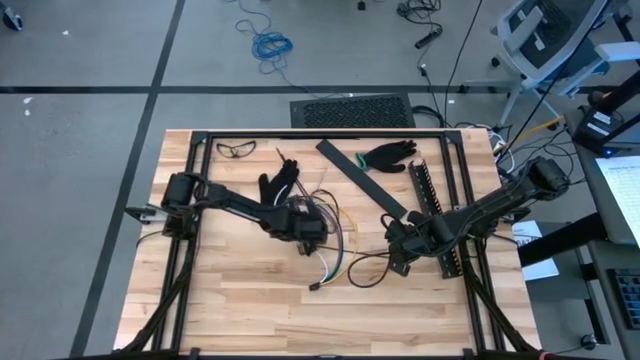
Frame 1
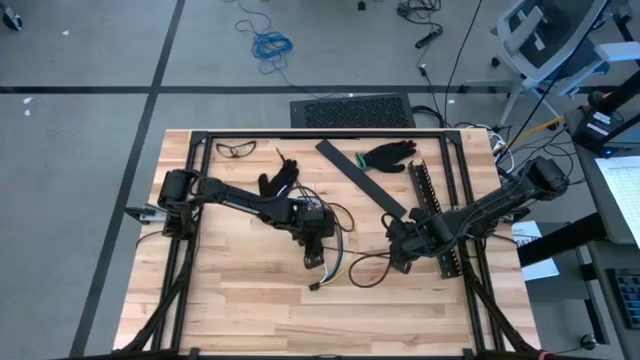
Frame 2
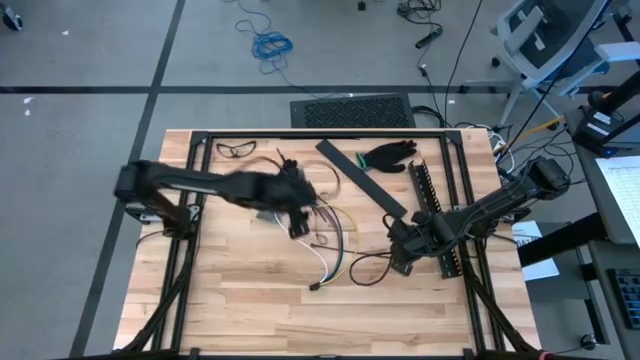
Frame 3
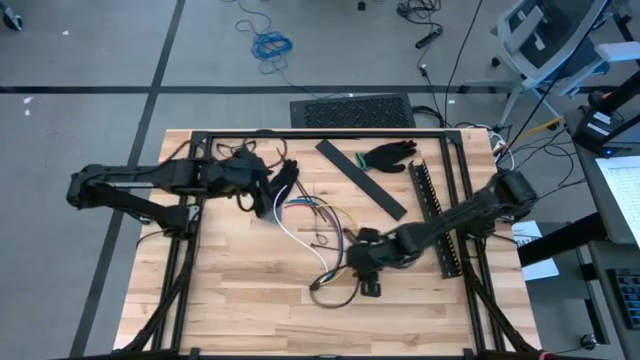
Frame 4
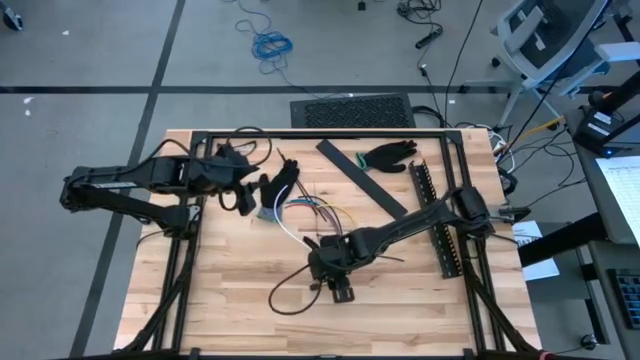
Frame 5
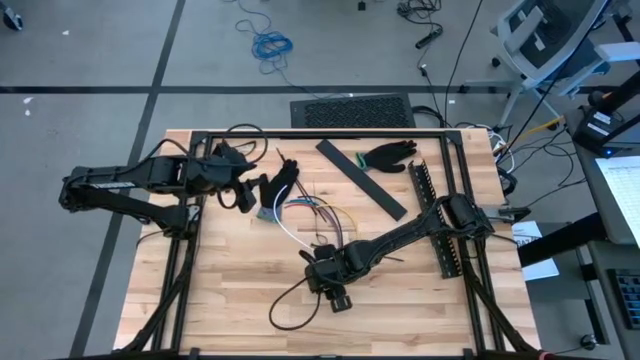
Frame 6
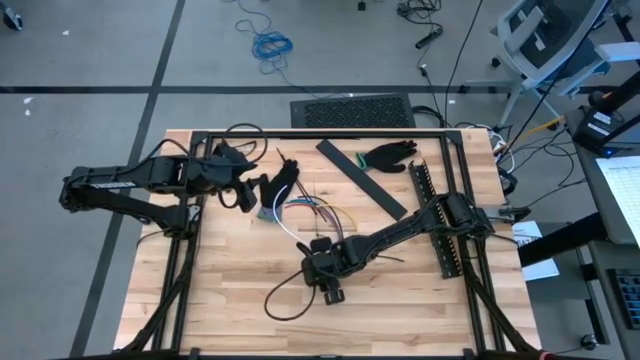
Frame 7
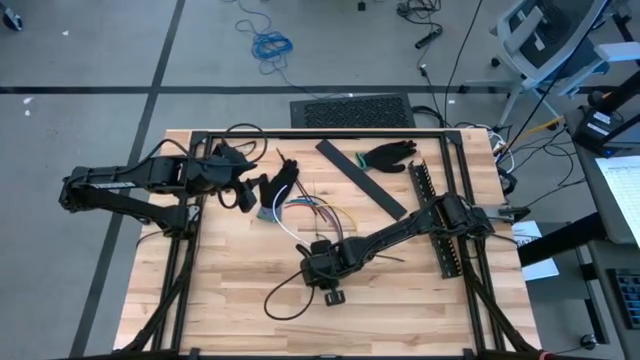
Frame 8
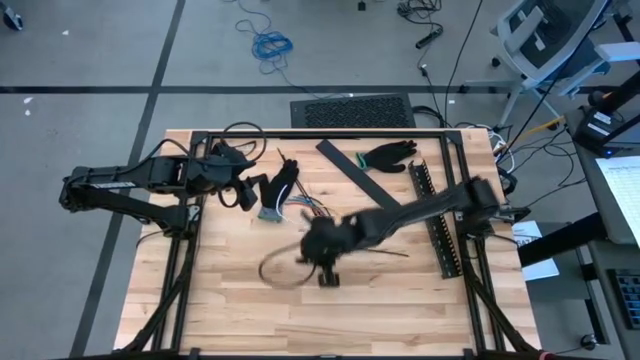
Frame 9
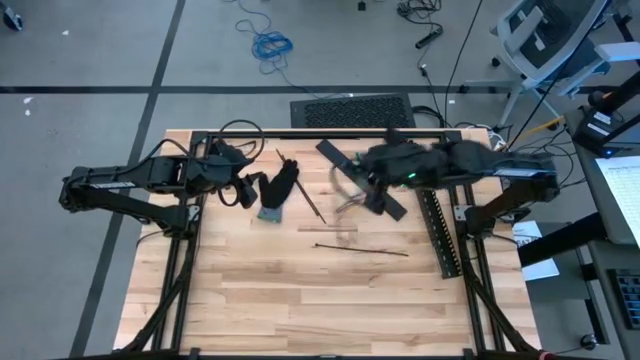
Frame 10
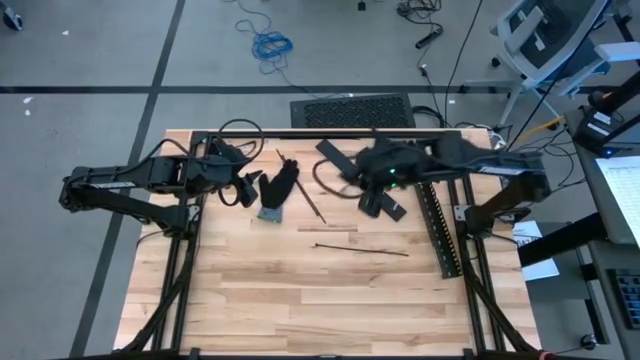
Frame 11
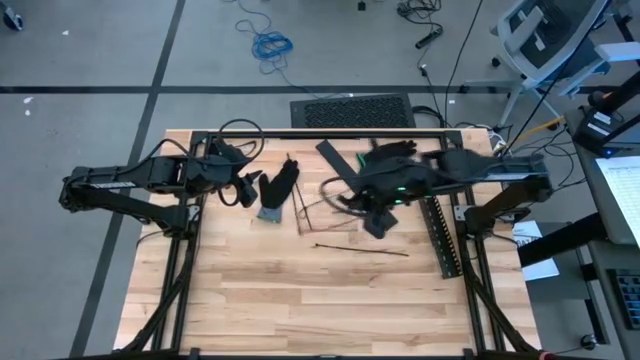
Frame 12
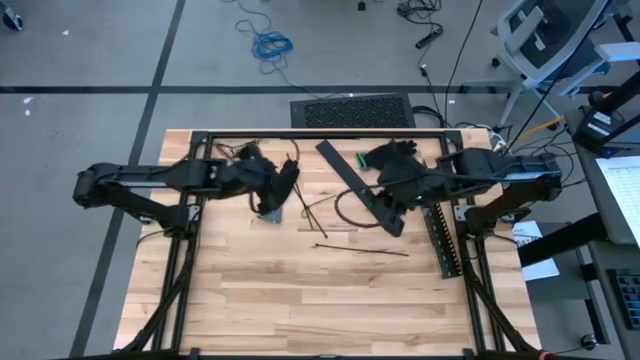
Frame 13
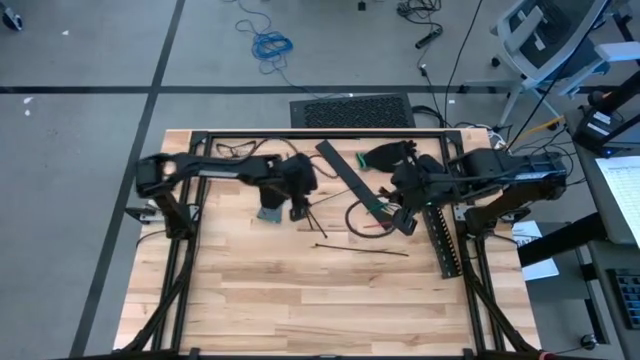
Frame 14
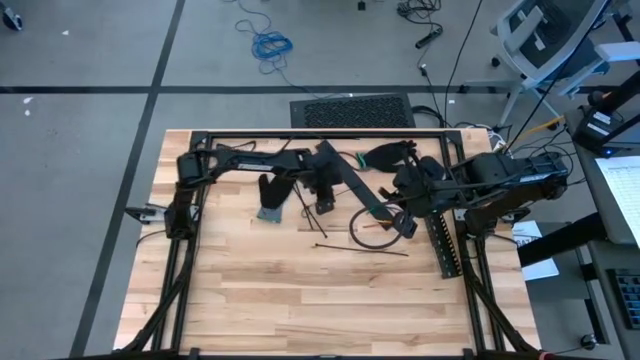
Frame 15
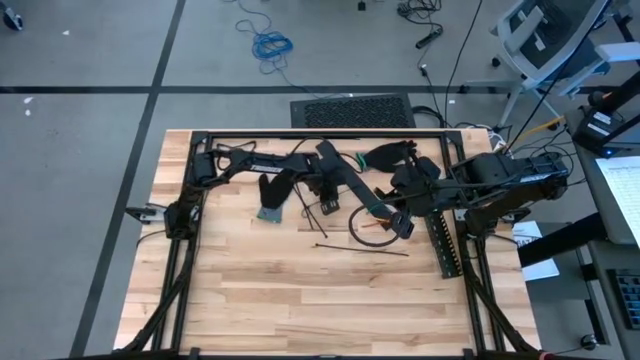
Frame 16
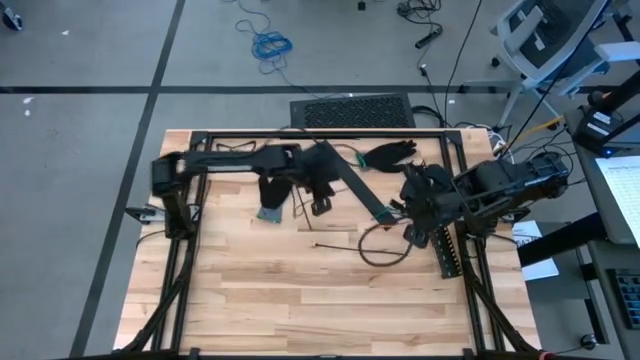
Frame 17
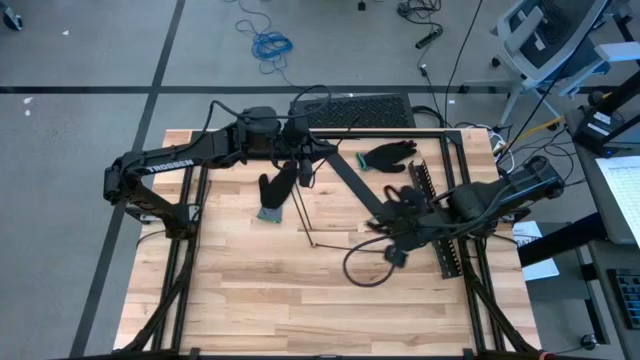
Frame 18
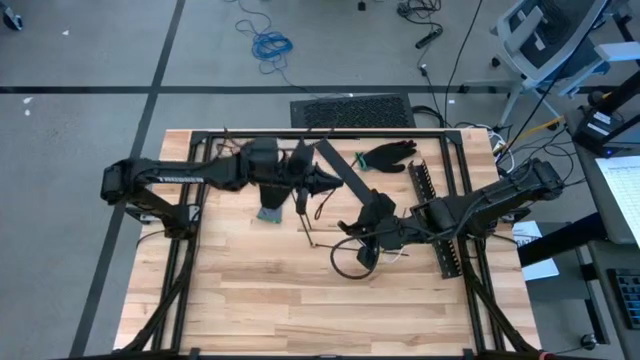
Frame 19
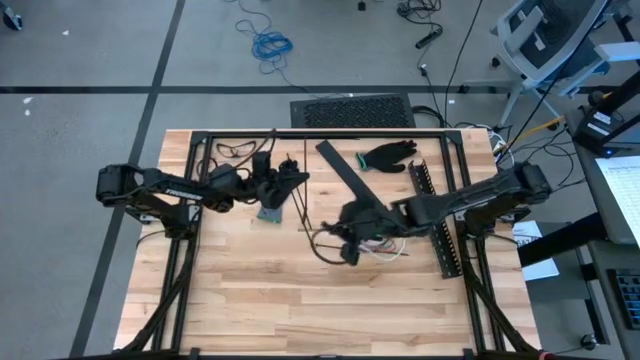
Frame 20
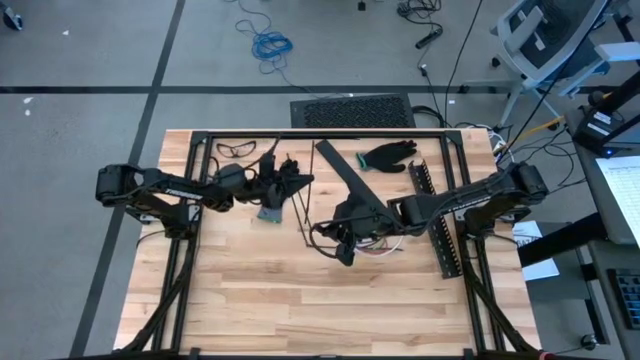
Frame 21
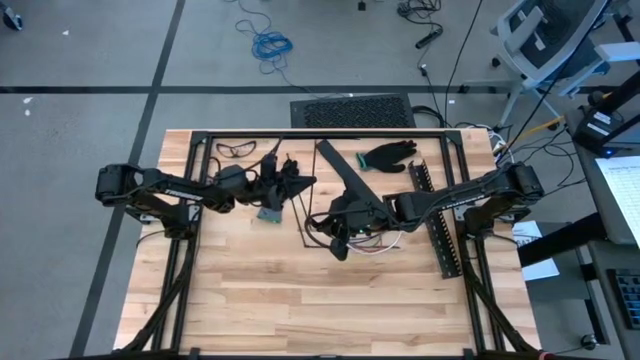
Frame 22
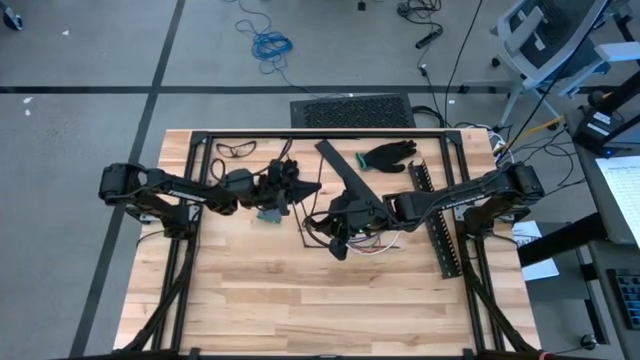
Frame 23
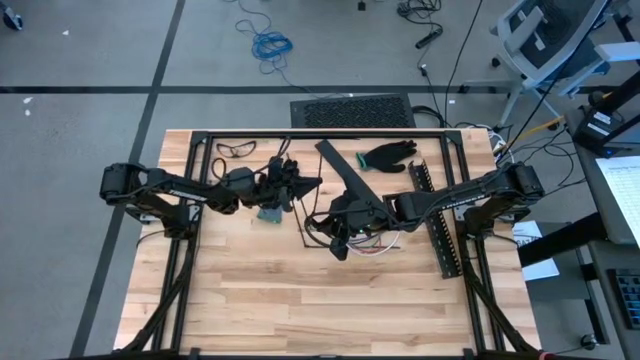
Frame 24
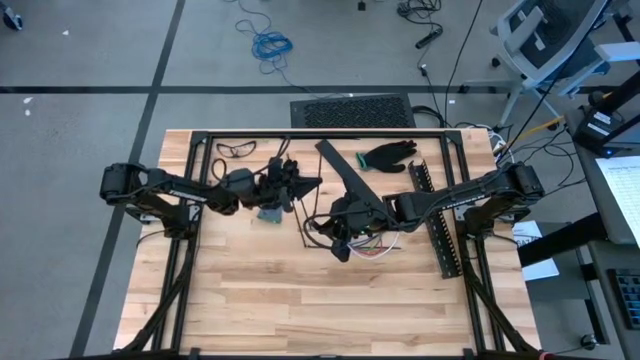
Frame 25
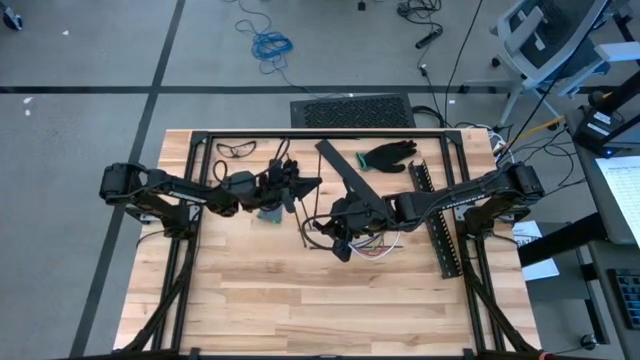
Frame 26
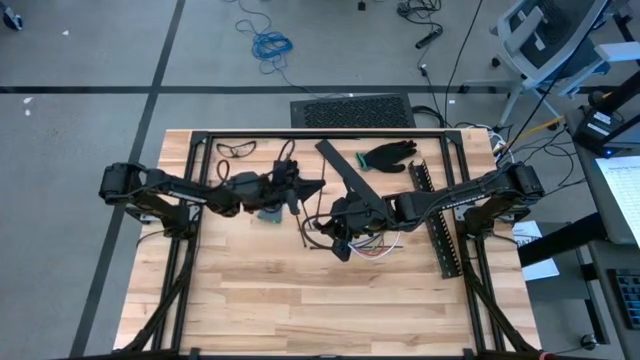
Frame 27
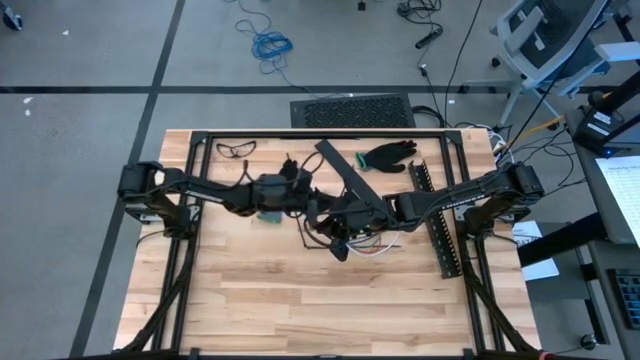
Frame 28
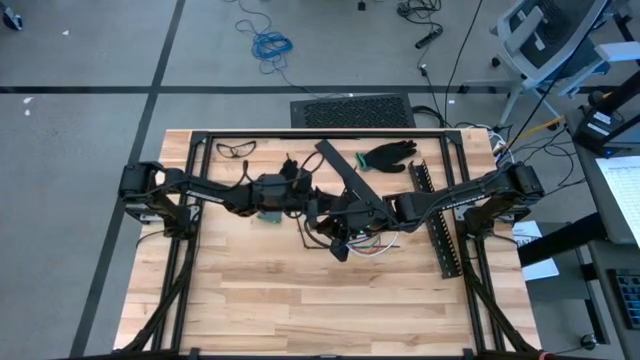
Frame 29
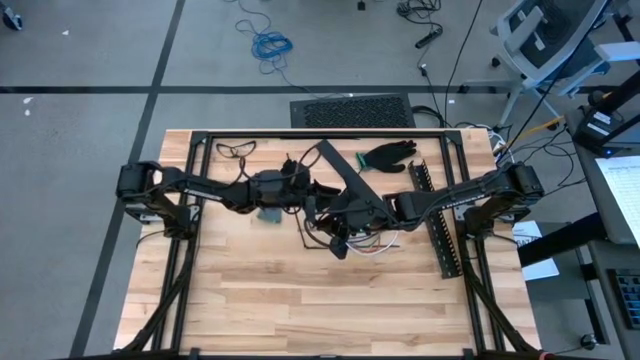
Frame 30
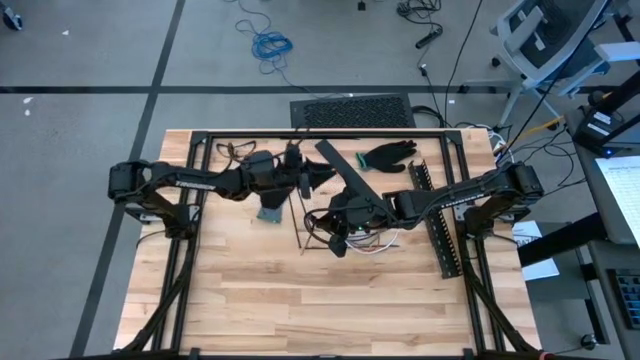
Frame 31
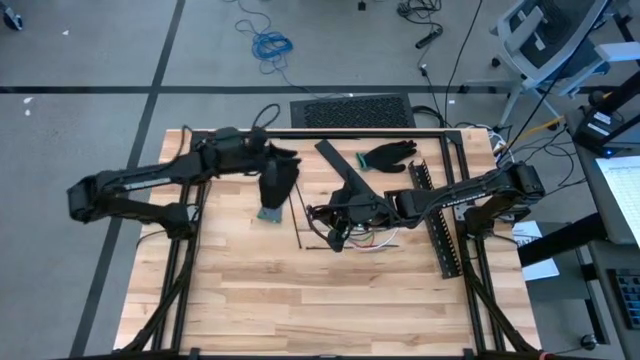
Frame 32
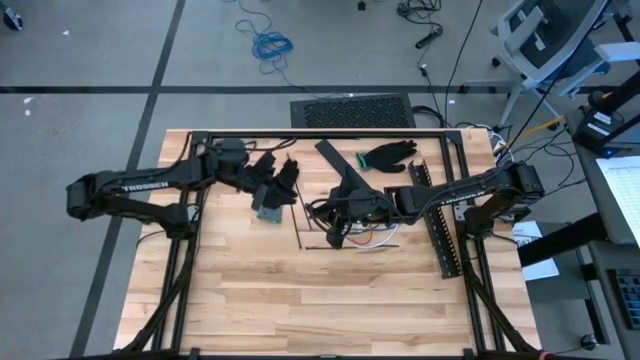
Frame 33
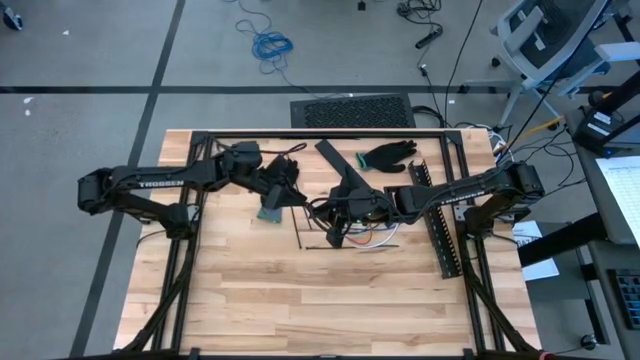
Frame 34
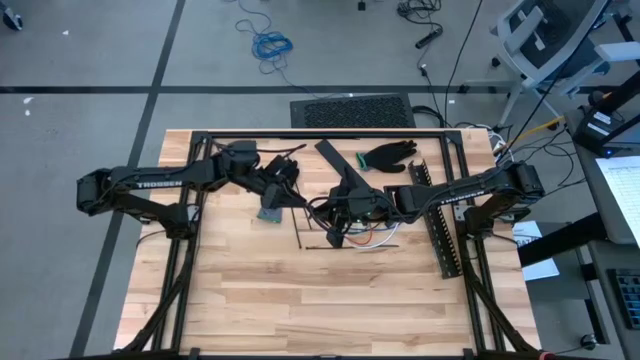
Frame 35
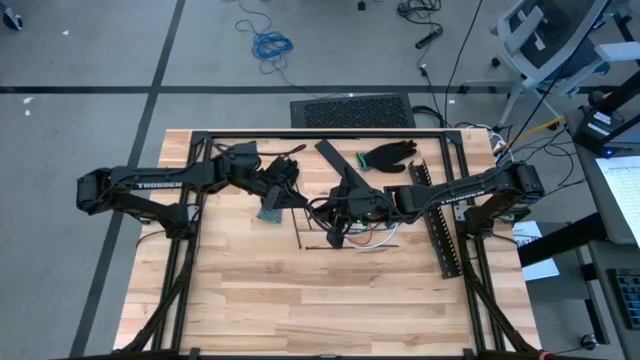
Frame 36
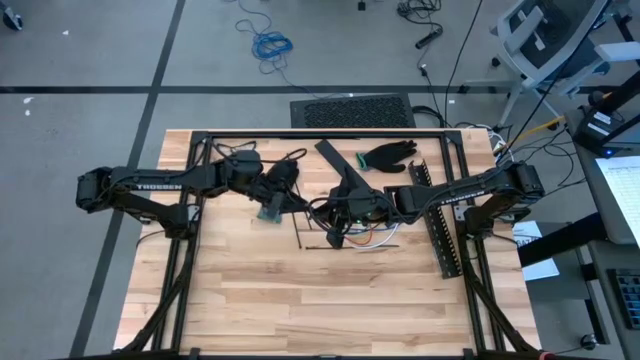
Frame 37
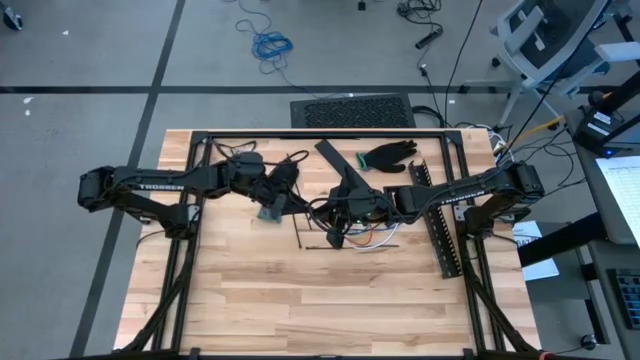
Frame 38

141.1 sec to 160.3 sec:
Task: Ziptie cables
Wrap the black zip tie on the cable

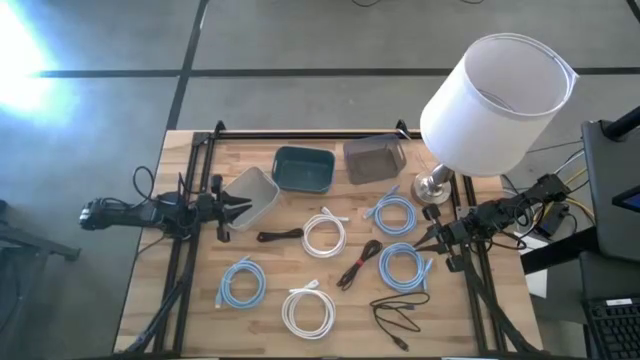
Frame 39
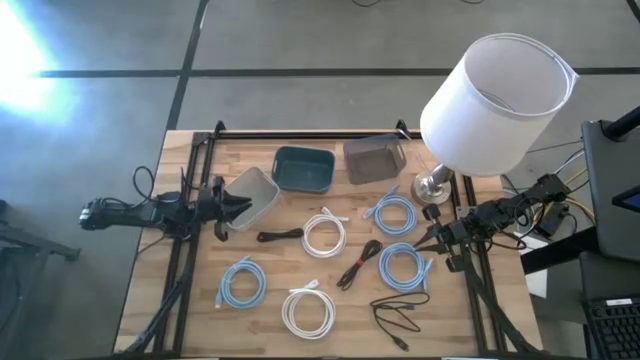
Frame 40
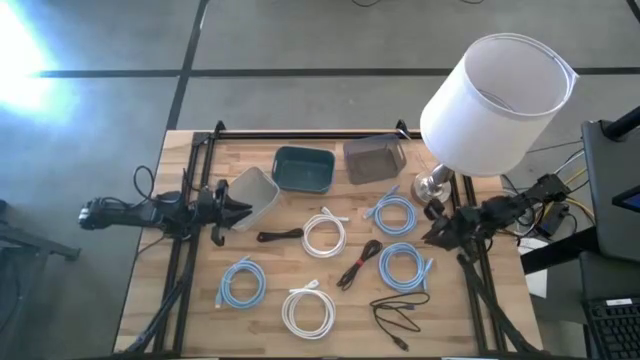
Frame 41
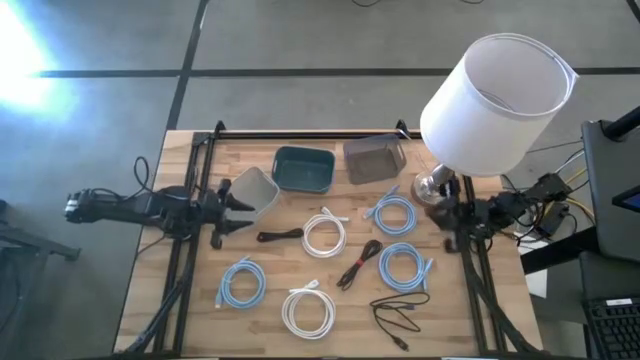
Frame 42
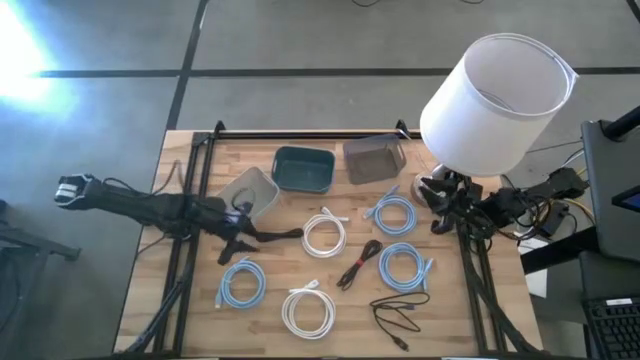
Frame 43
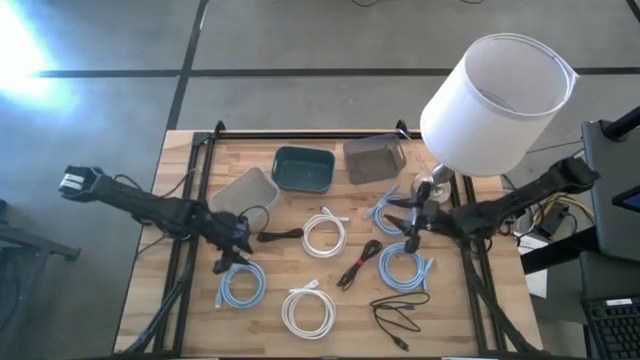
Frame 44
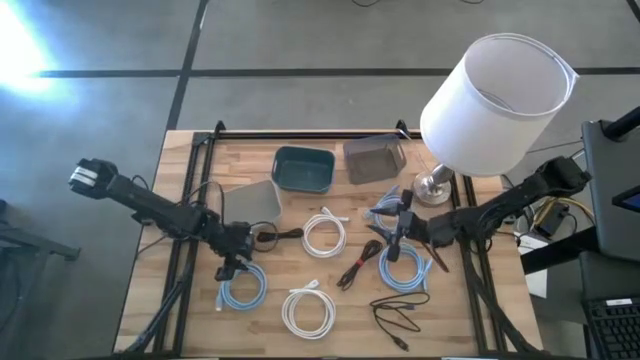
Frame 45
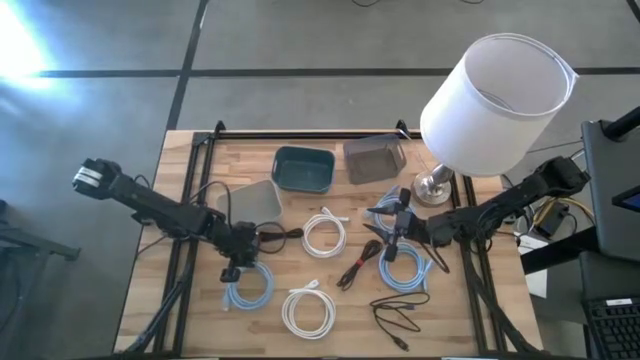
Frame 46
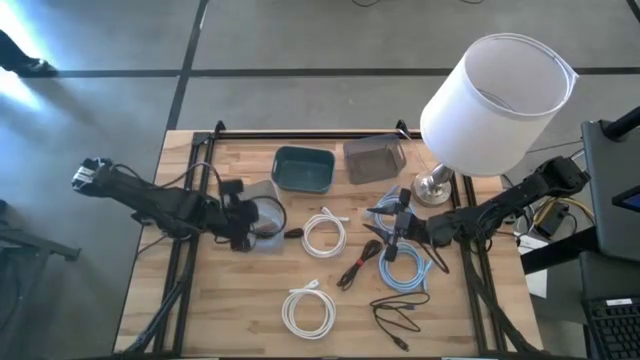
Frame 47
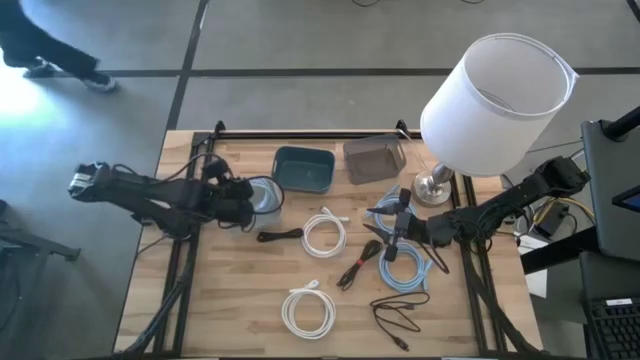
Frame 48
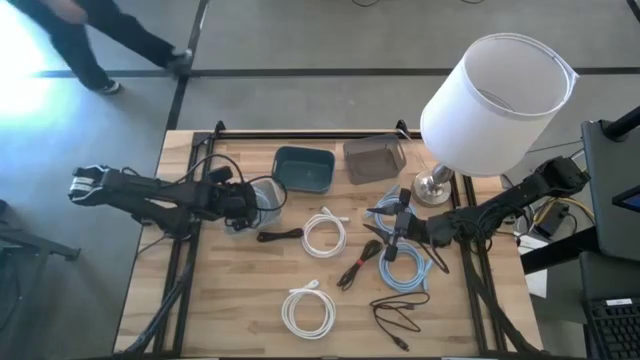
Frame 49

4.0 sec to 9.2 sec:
Task: Pick & Place USB Port
Put the bottom left light blue HDMI cable into the white bin
